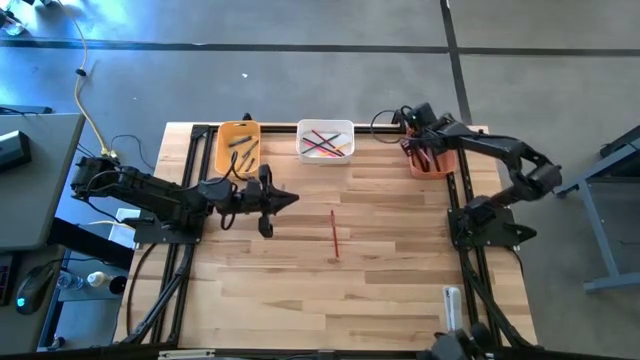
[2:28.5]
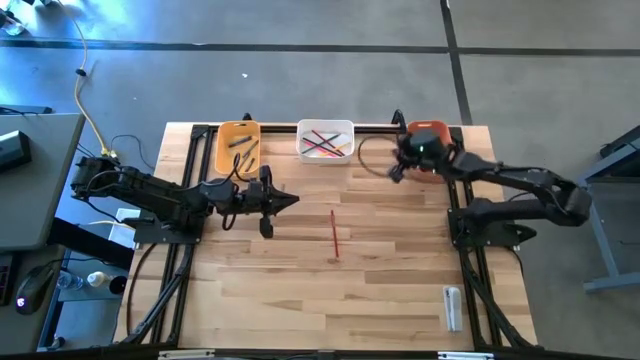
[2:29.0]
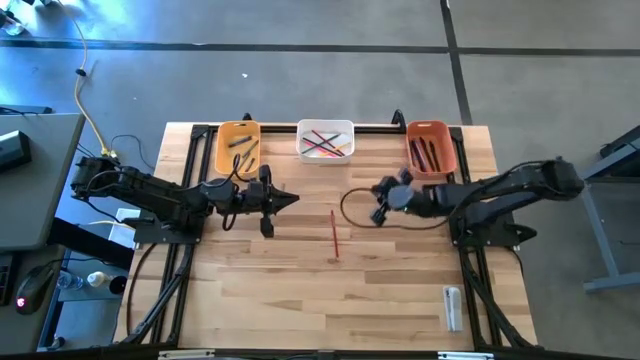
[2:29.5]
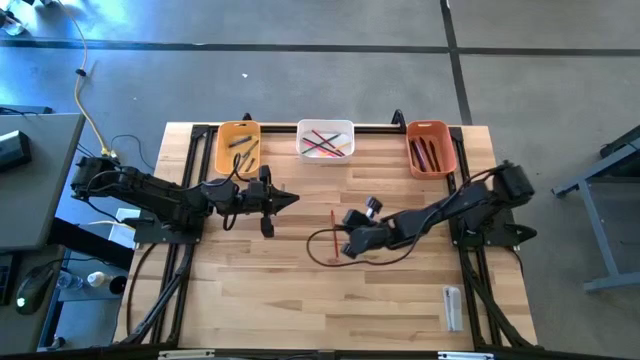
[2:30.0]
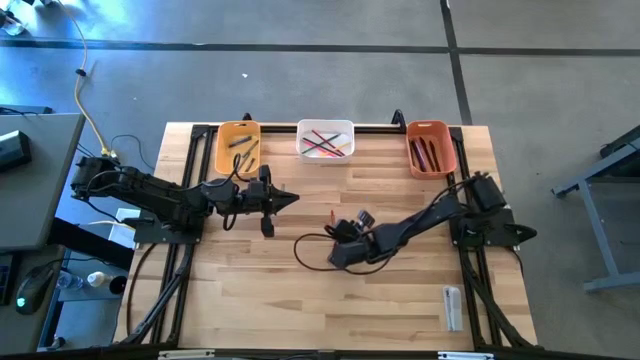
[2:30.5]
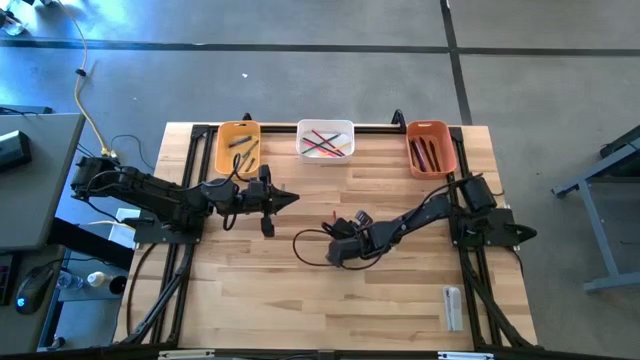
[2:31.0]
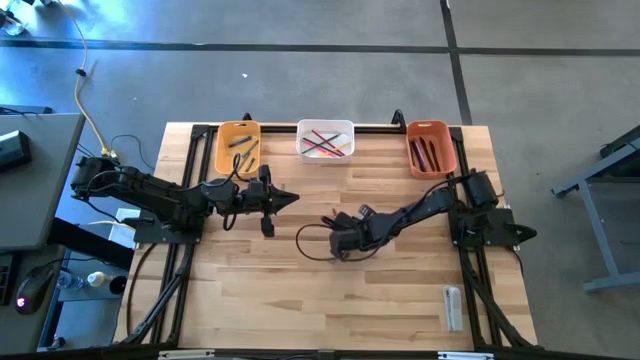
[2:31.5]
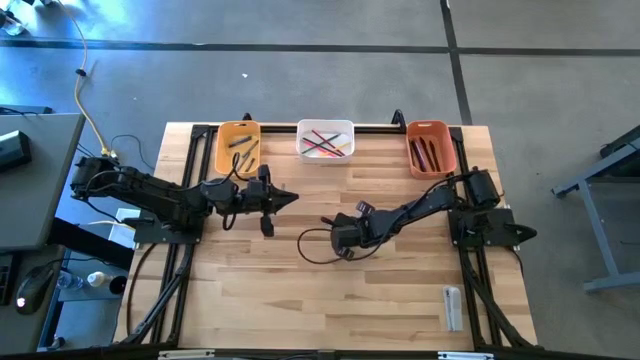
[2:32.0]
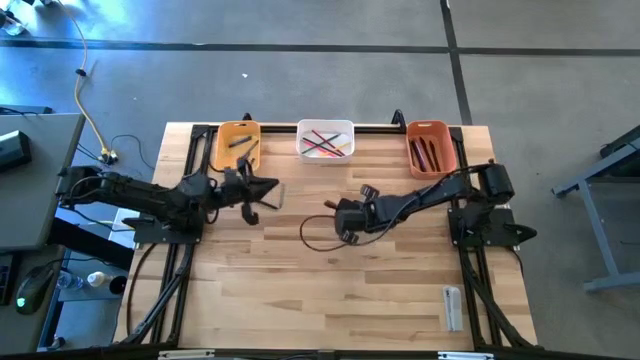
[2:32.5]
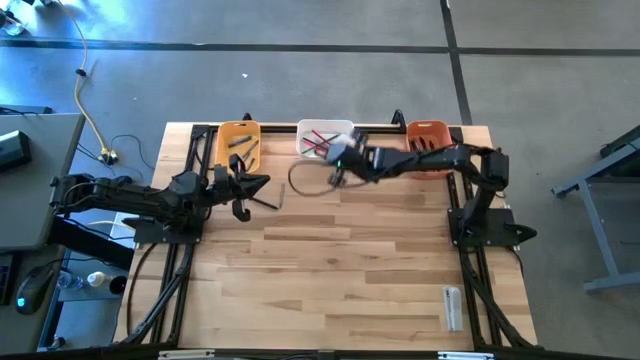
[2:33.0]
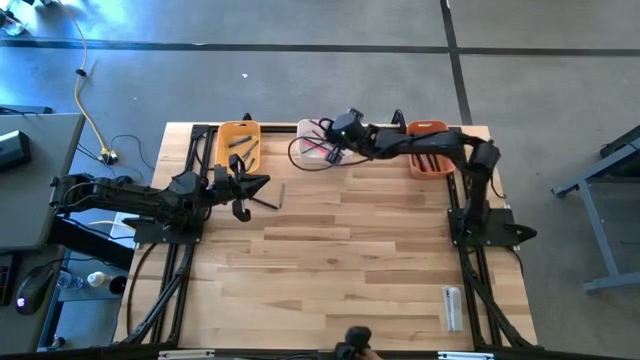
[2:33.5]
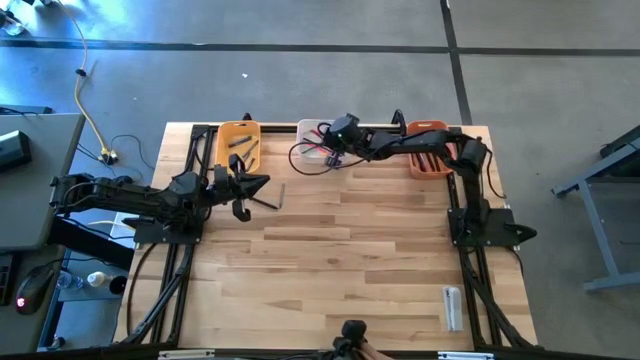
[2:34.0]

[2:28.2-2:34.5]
Task: Sort crayons/erasers/pens/pencils in bins
Put the red color pen into the white bin

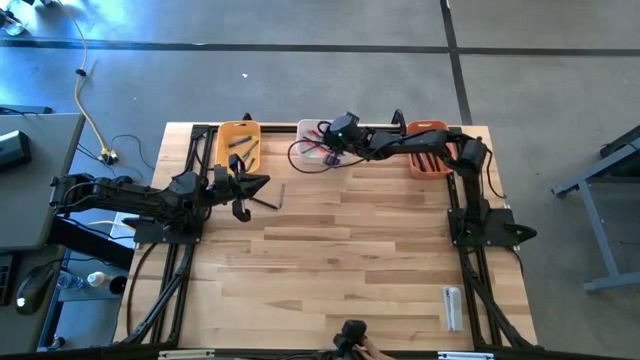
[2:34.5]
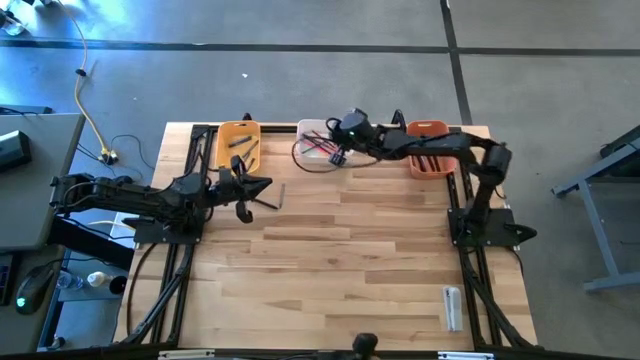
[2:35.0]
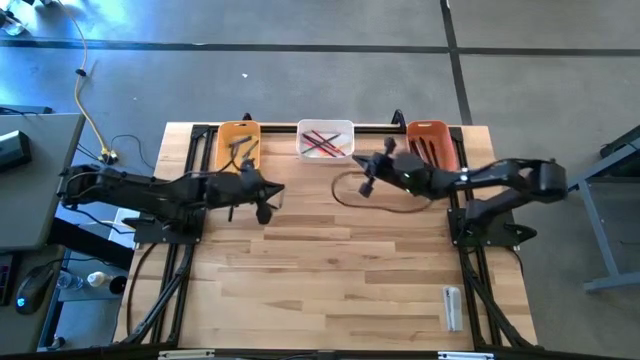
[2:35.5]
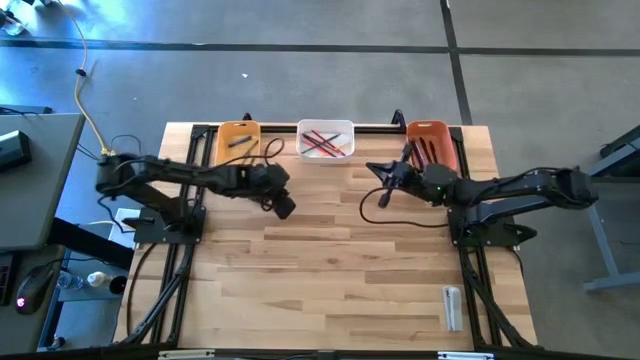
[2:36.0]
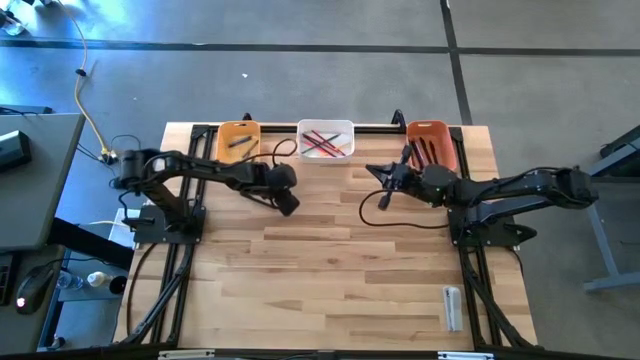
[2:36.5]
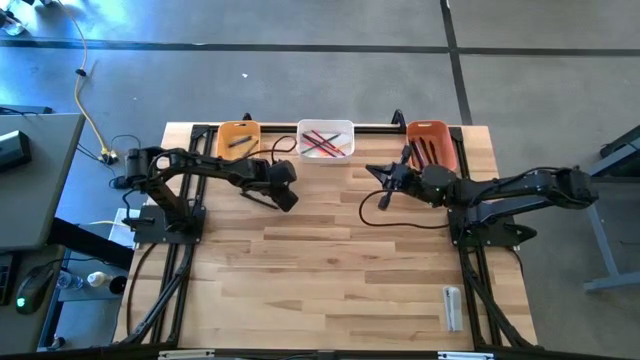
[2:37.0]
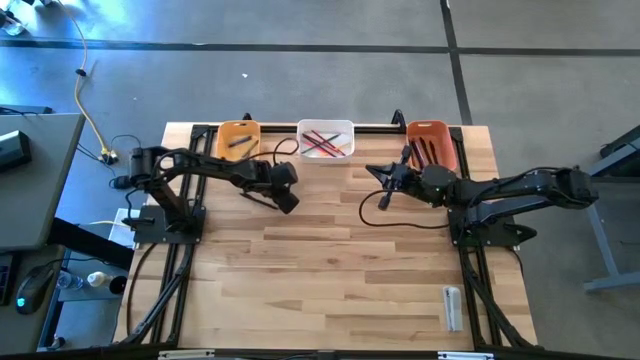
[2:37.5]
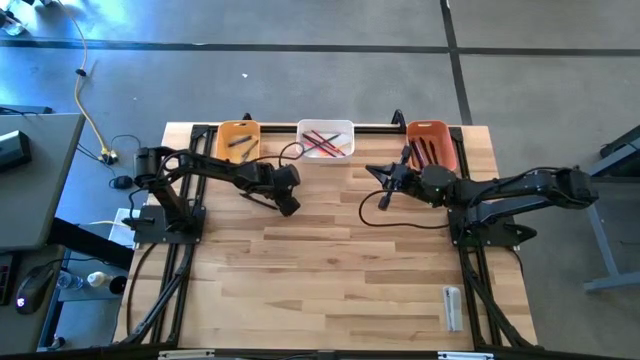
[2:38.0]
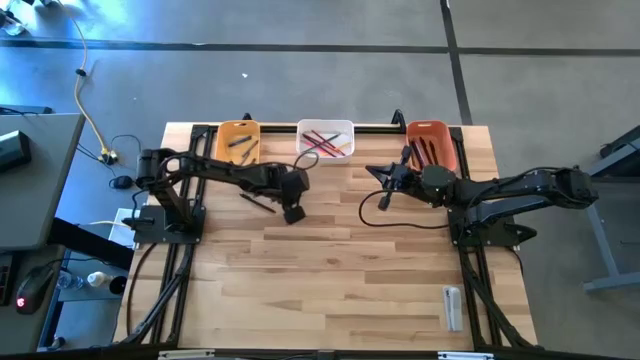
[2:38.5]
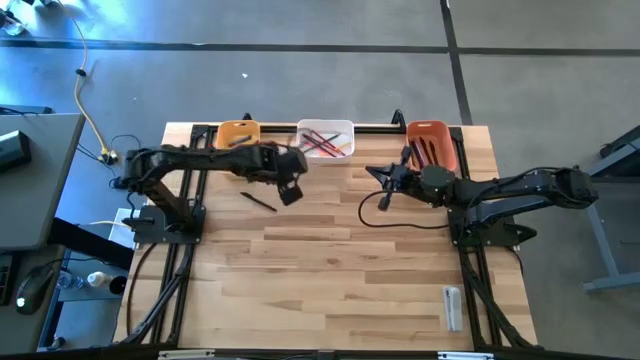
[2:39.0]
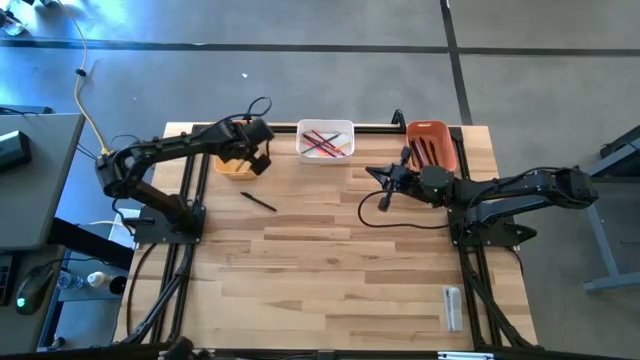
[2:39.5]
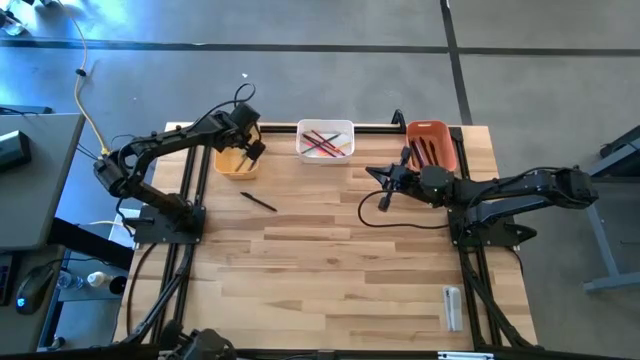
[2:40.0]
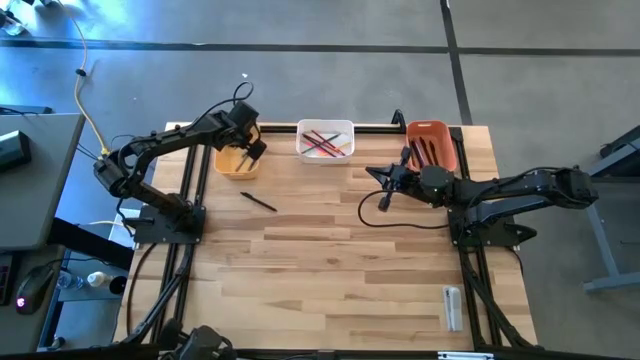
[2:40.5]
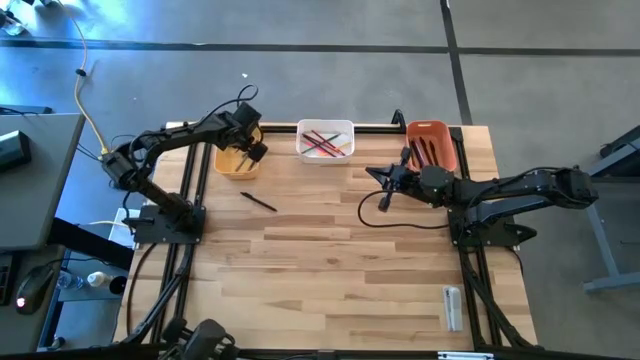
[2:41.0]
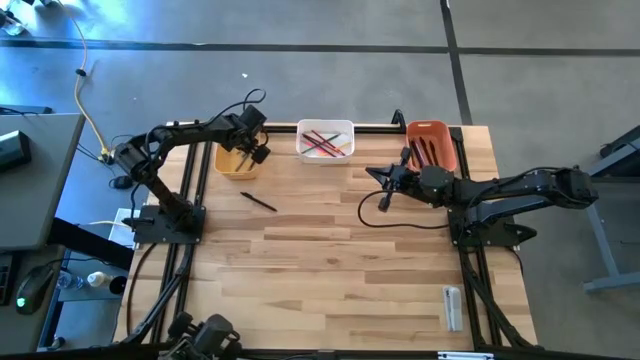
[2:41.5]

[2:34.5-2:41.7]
Put the gray crayon into the yellow bin

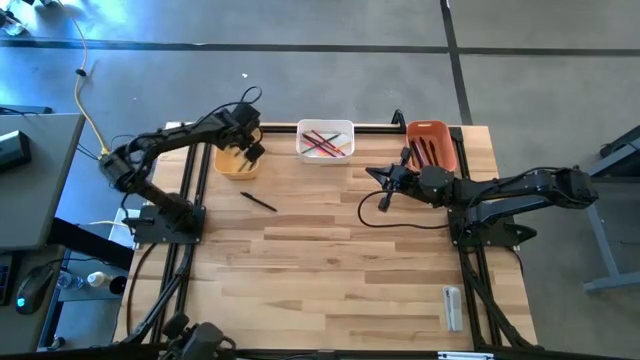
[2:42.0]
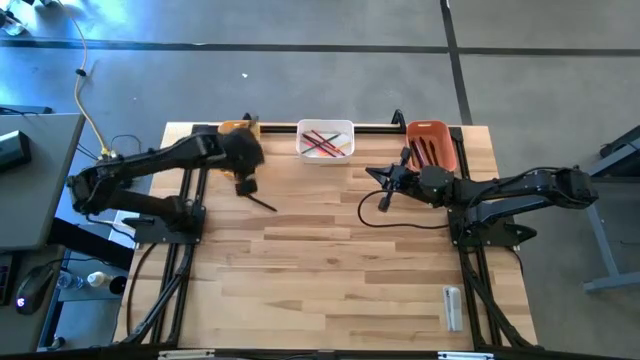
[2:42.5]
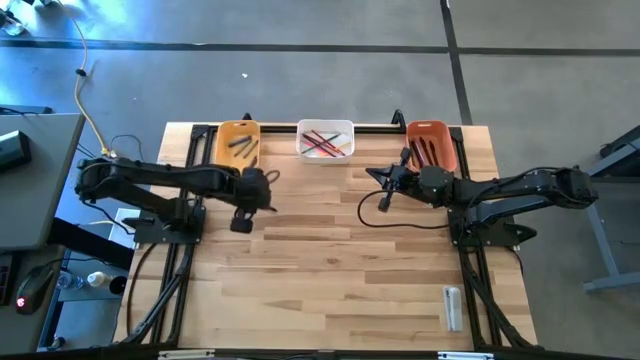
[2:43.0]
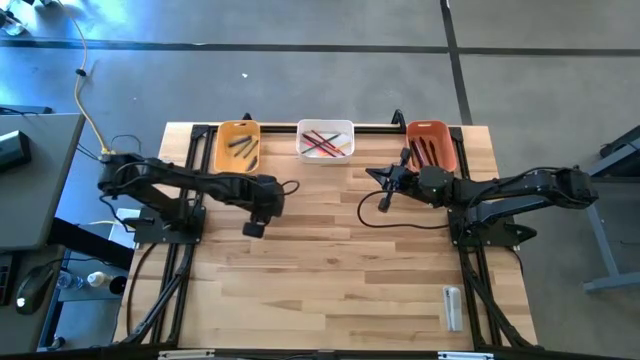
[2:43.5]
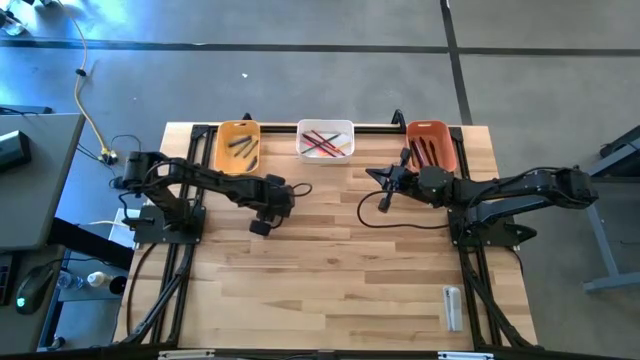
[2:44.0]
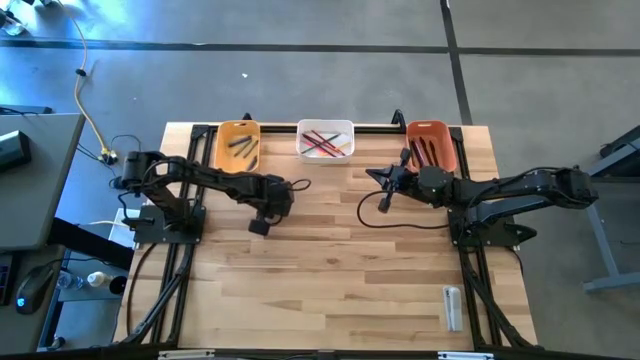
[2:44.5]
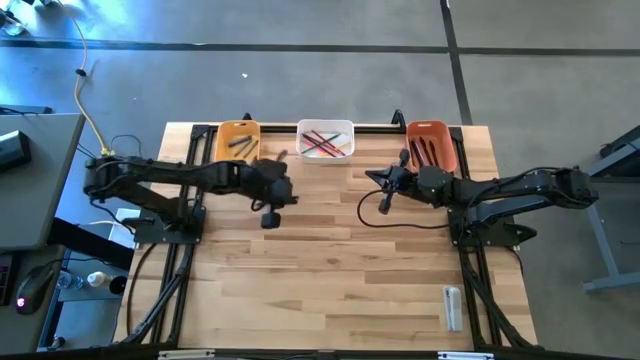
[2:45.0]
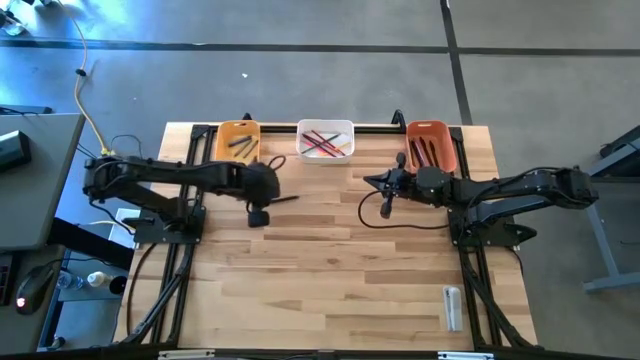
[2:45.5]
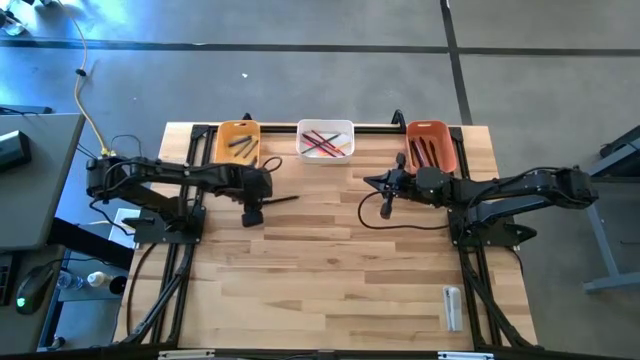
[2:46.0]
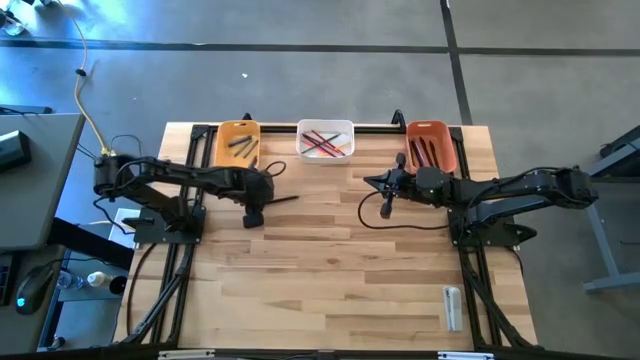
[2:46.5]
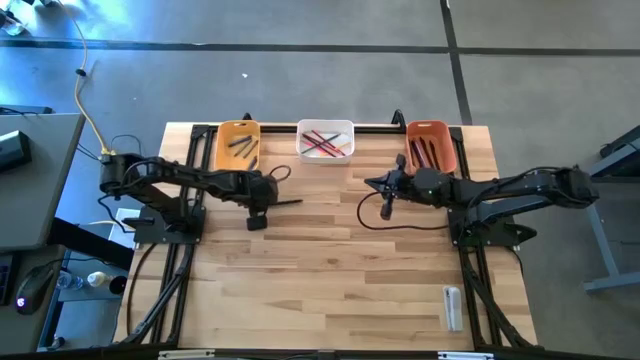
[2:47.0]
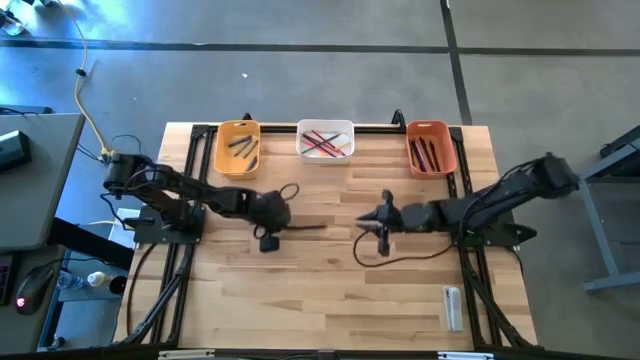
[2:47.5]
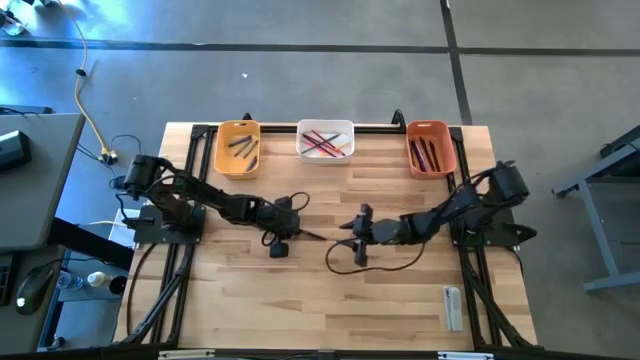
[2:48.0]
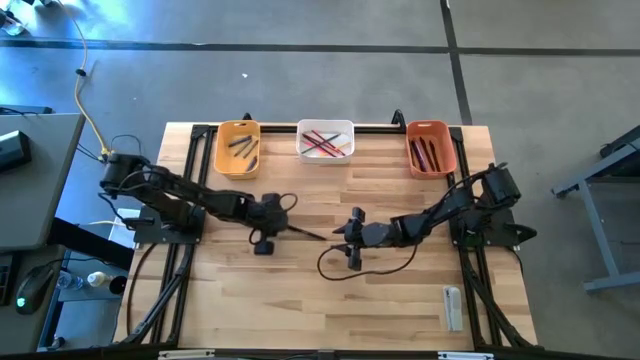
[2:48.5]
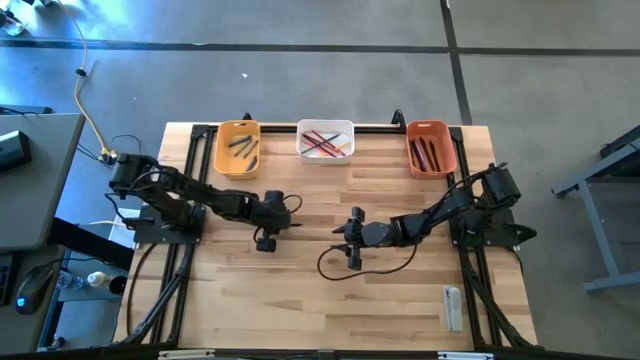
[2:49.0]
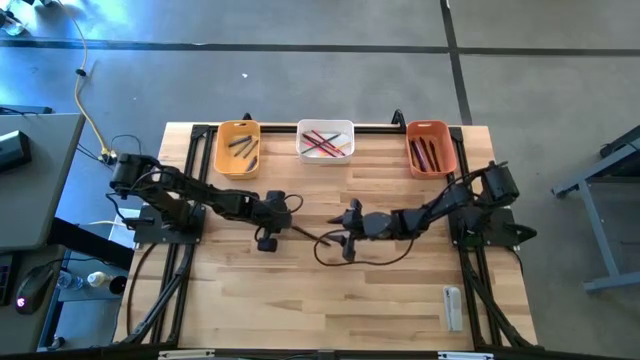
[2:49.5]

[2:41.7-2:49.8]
Put the black pen into the orange bin
